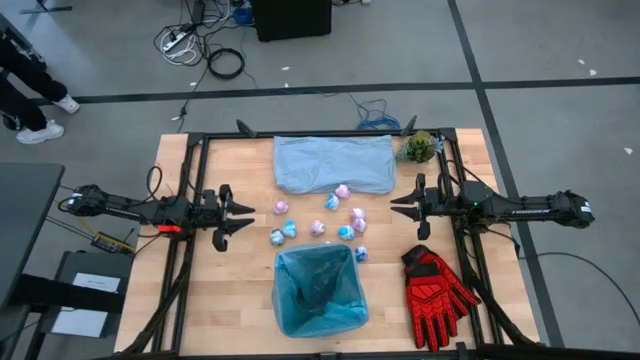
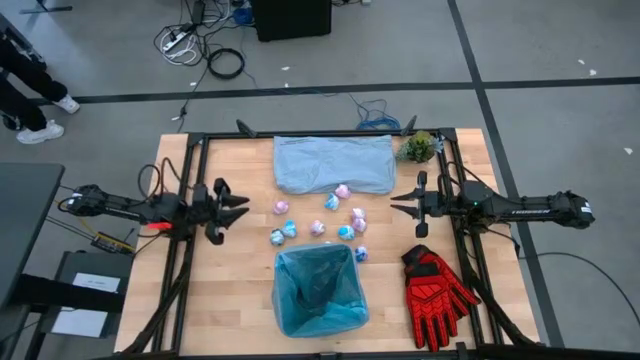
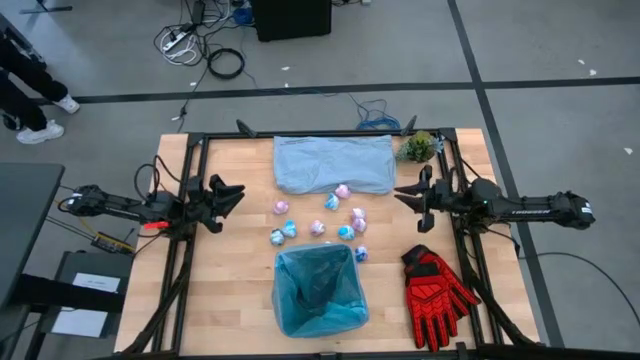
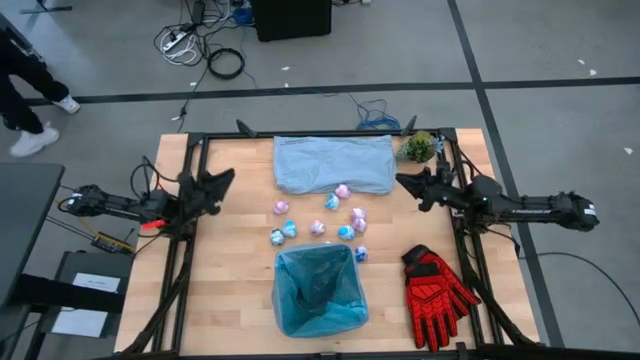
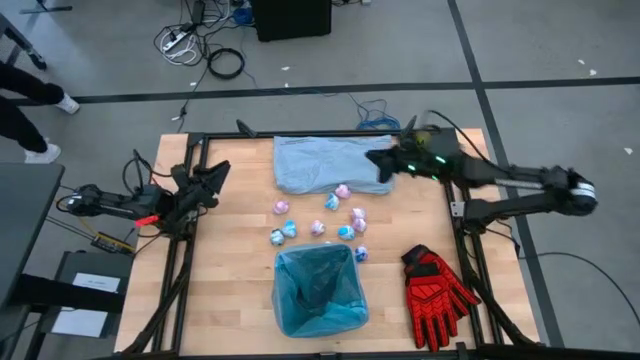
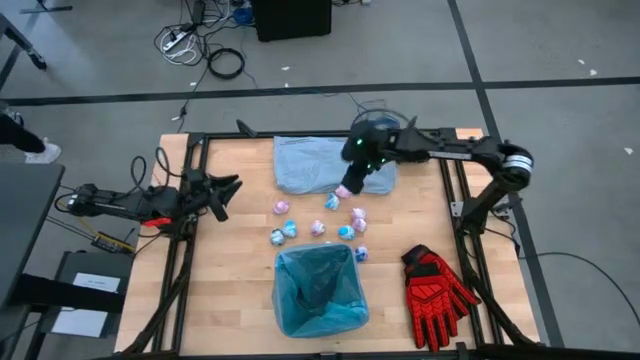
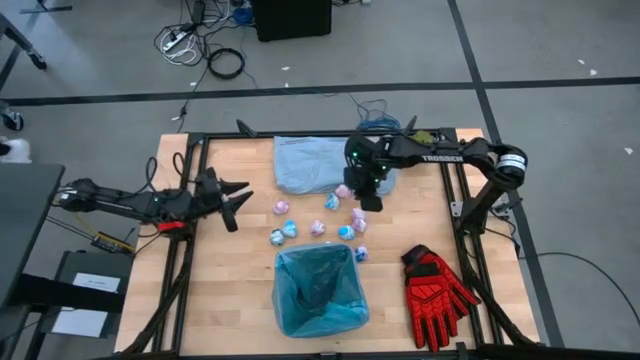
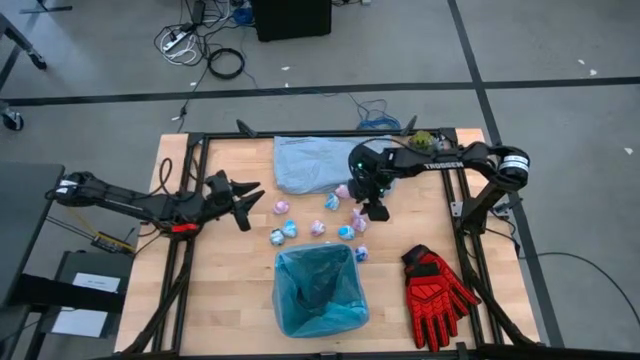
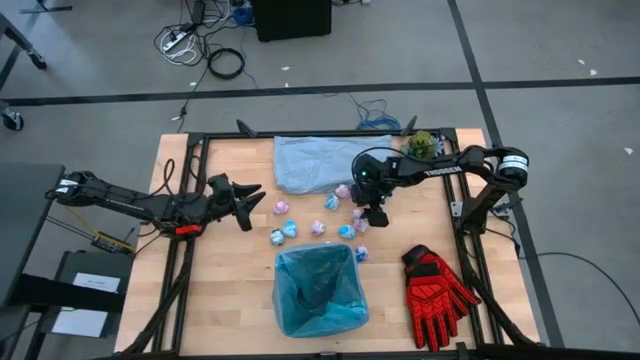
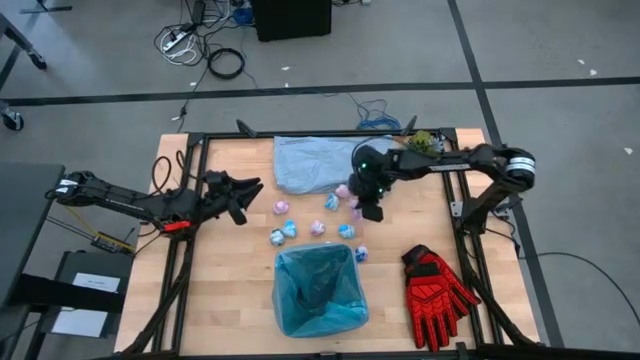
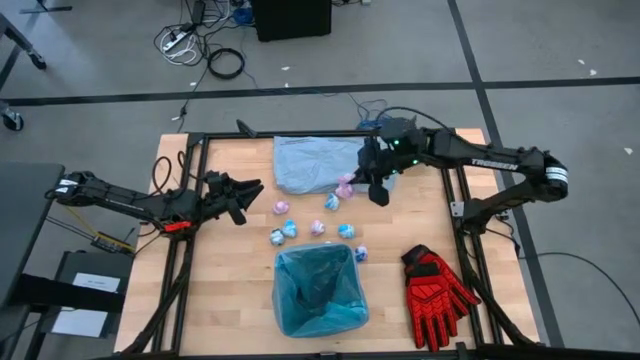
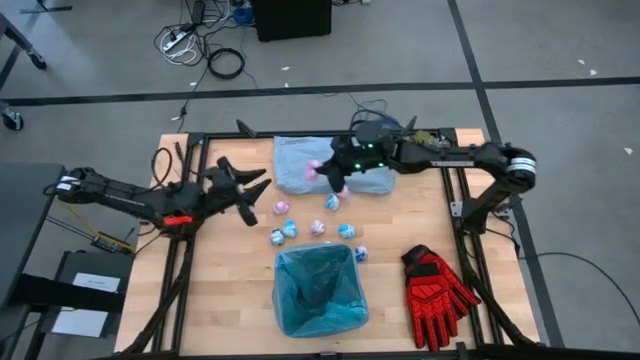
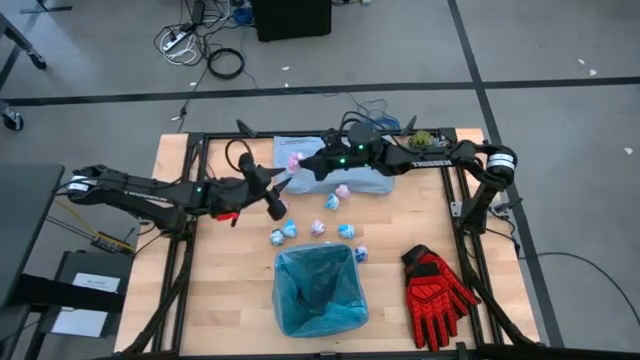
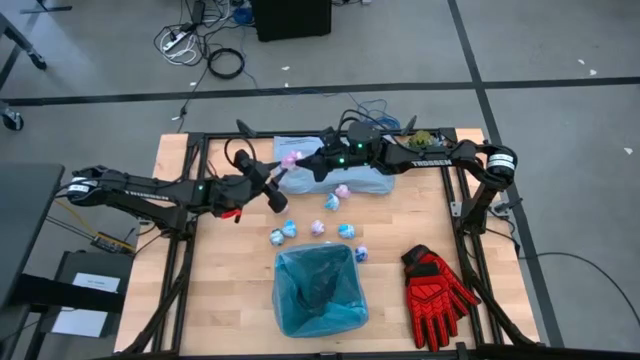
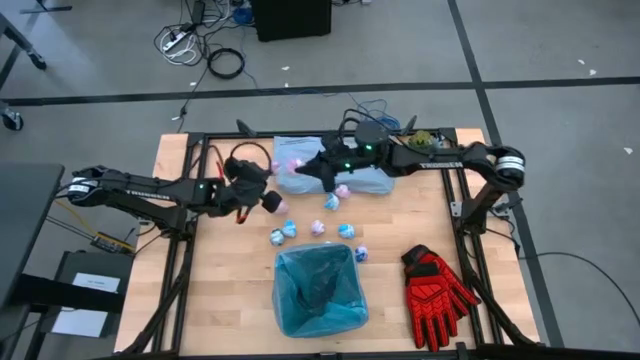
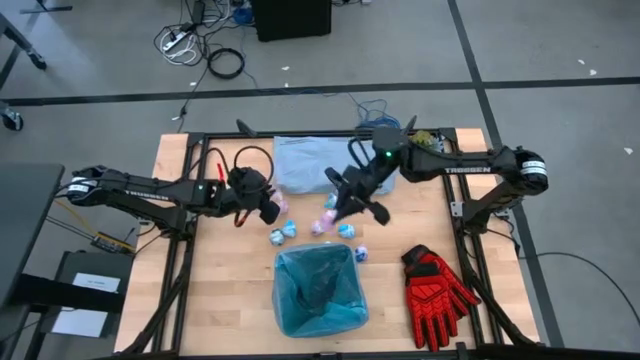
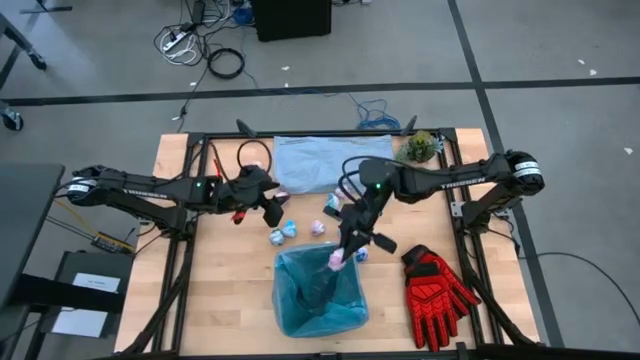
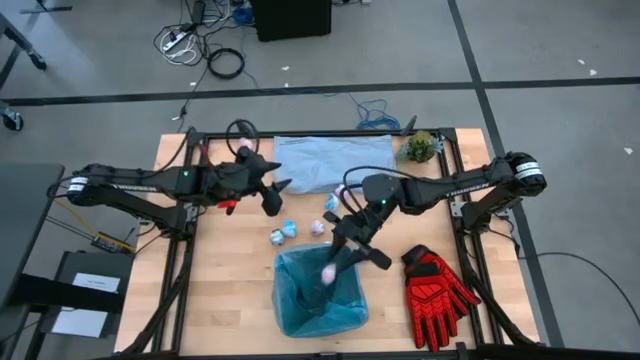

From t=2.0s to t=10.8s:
Task: place trash/remove bag and relplace
Put the pink crumbled trash bag into the trash bin

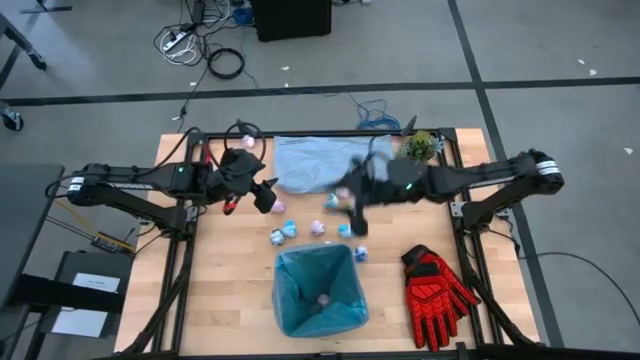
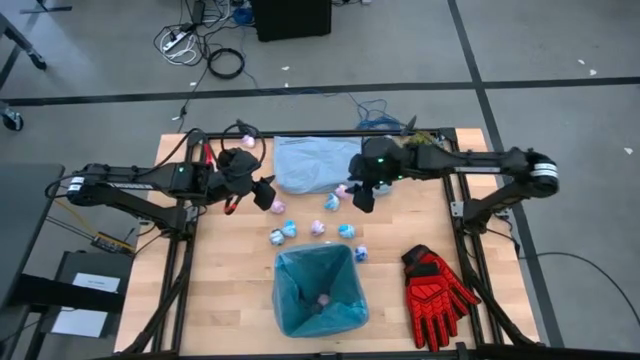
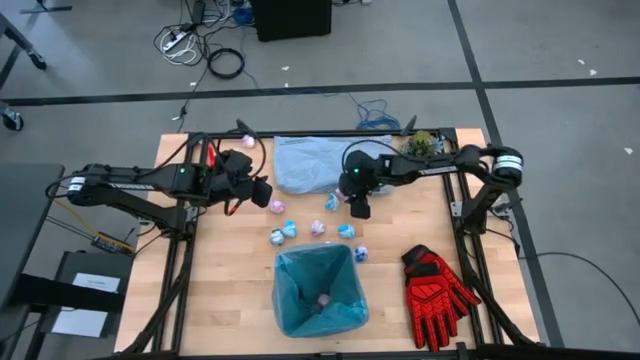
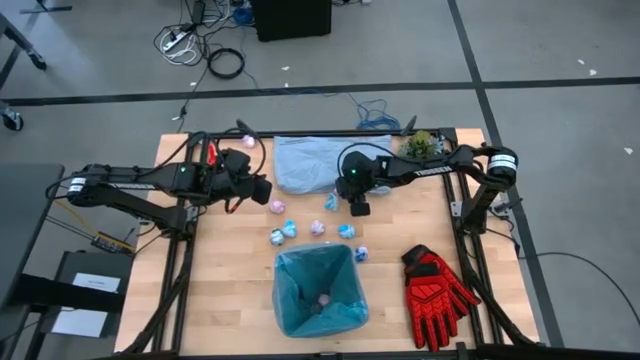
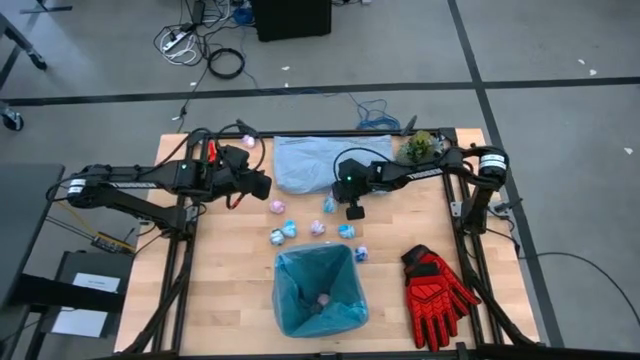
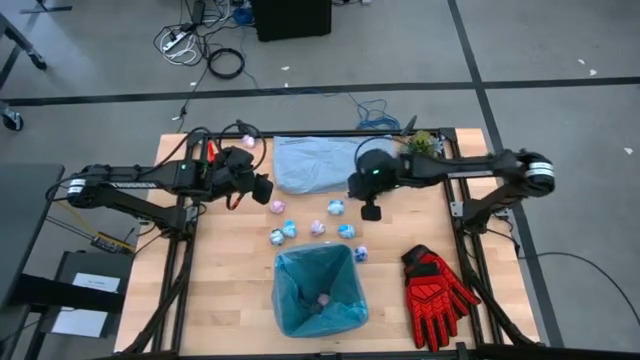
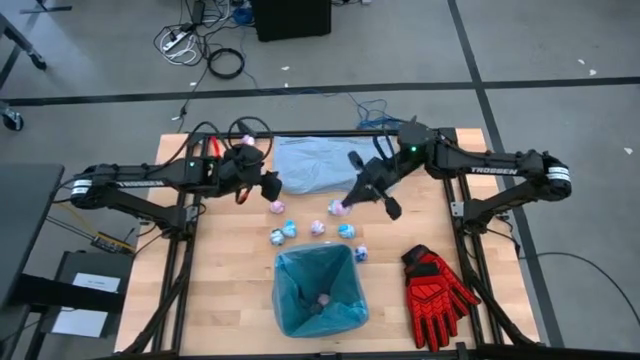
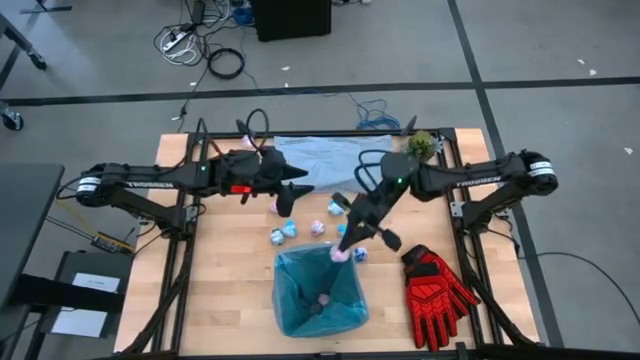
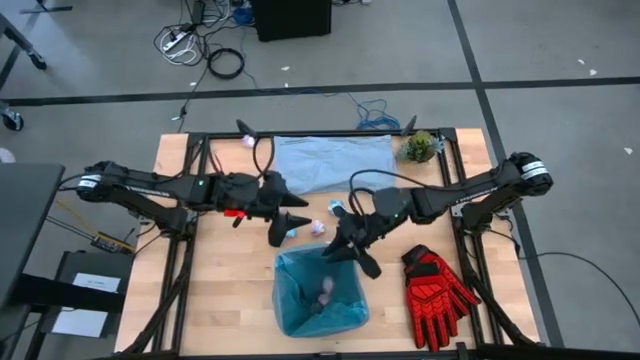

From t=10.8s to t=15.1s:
Put the pink crumbled trash bag into the trash bin

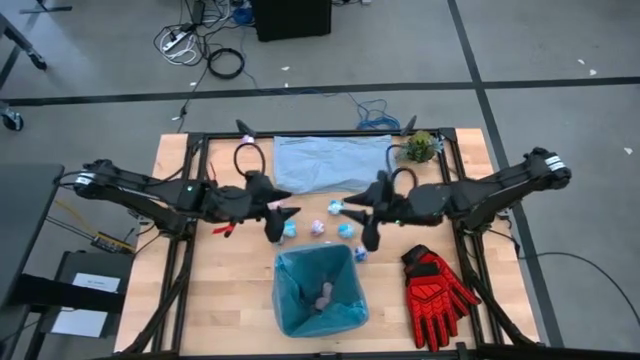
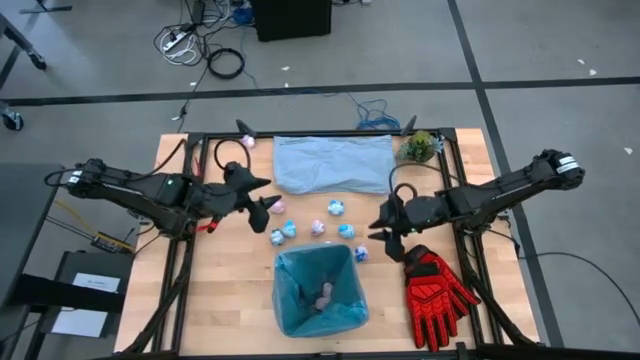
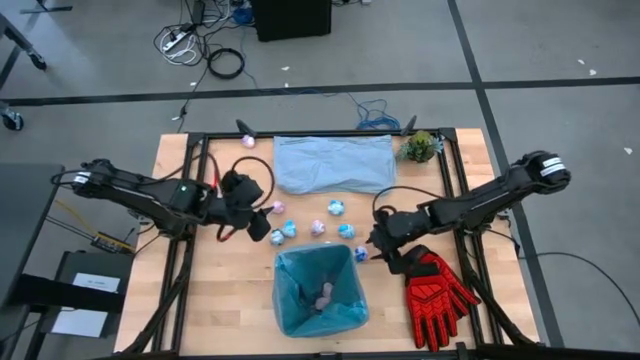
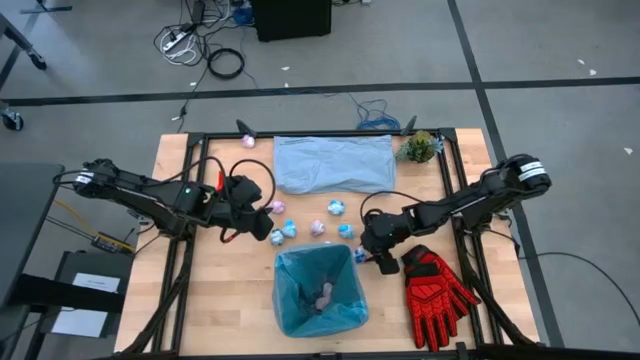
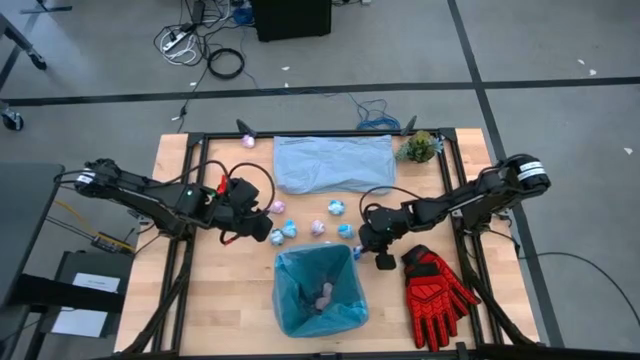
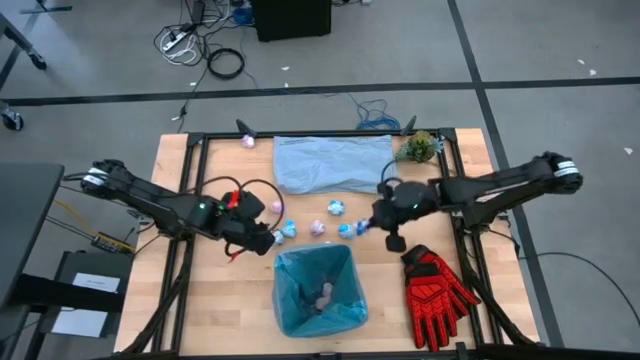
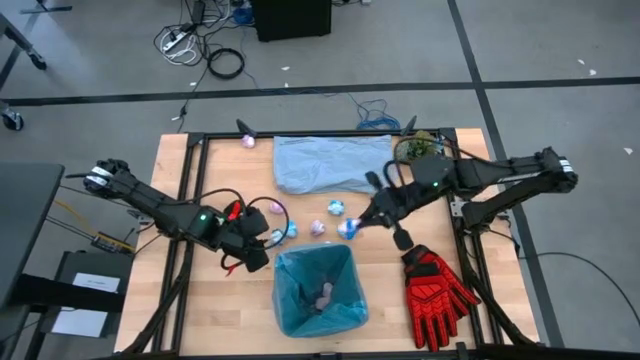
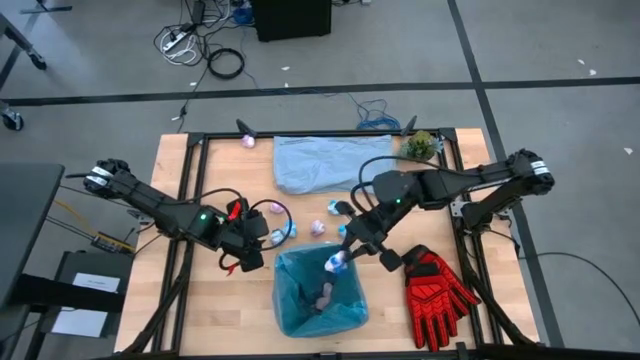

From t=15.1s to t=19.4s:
Put the pink crumbled trash bag into the trash bin

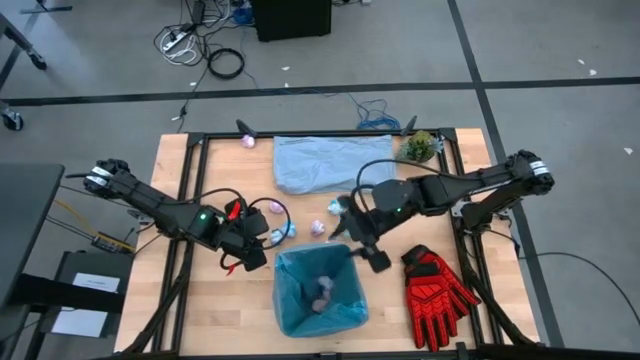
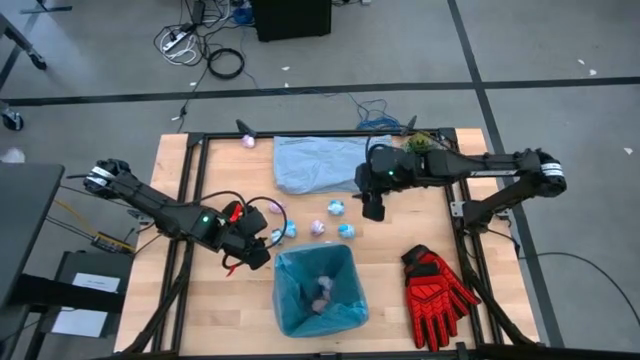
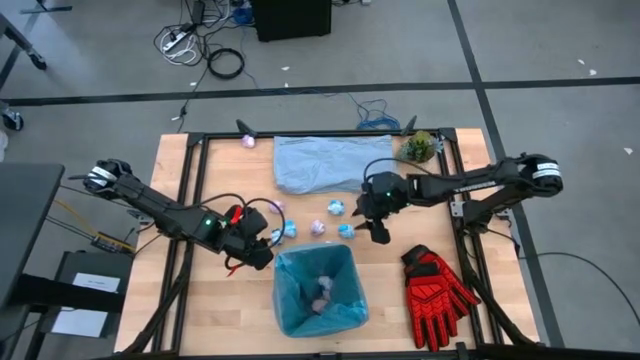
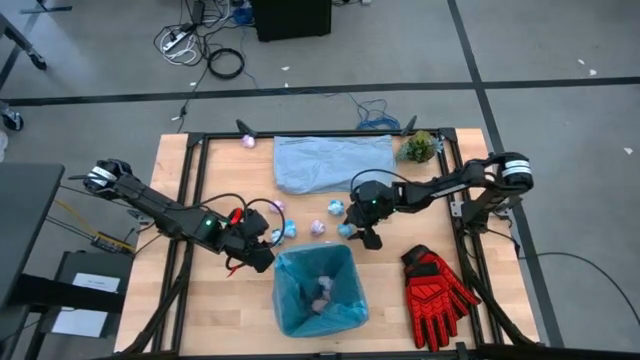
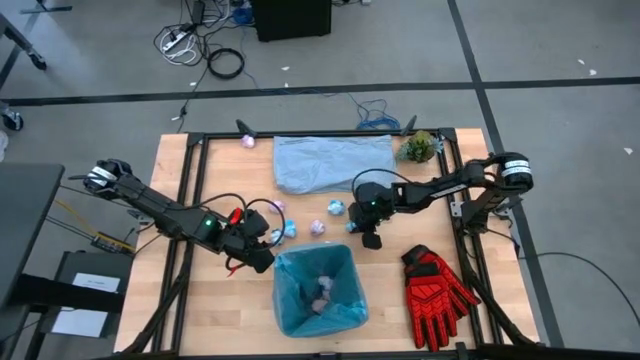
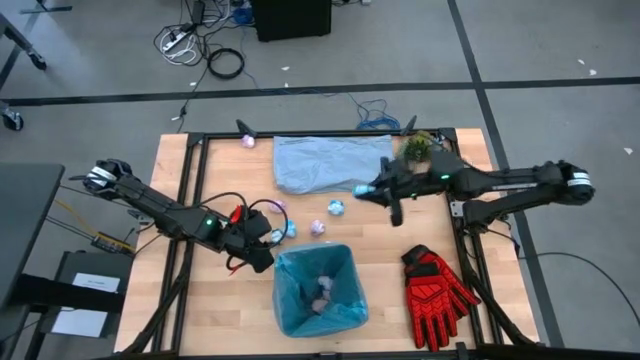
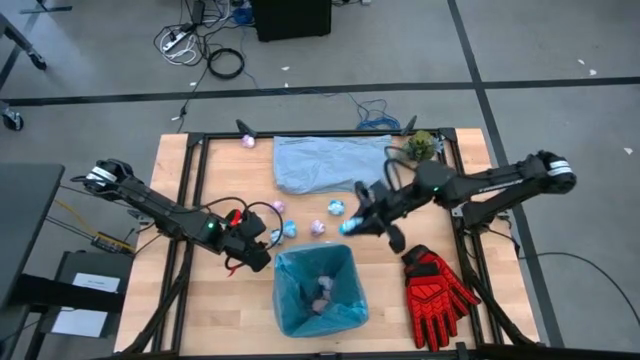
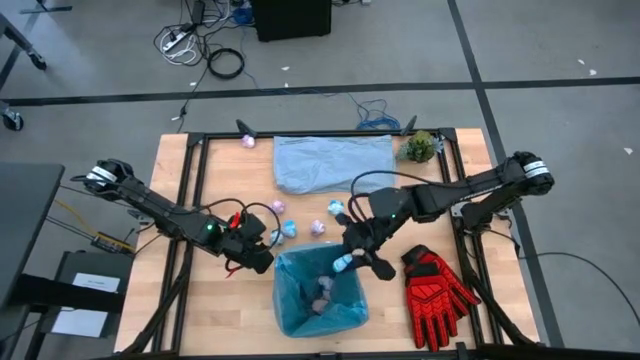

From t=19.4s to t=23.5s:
Put the blue crumbled trash bag into the trash bin
